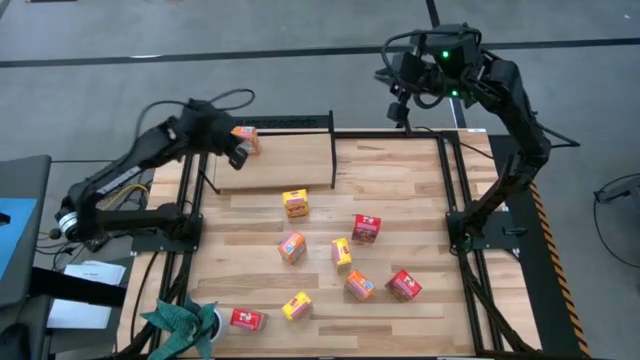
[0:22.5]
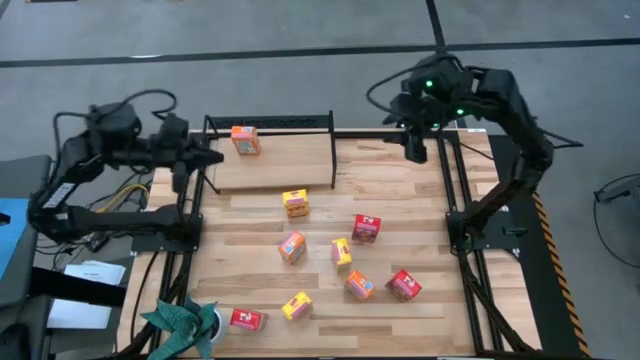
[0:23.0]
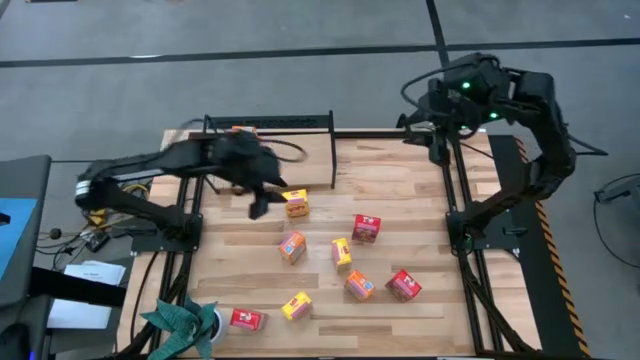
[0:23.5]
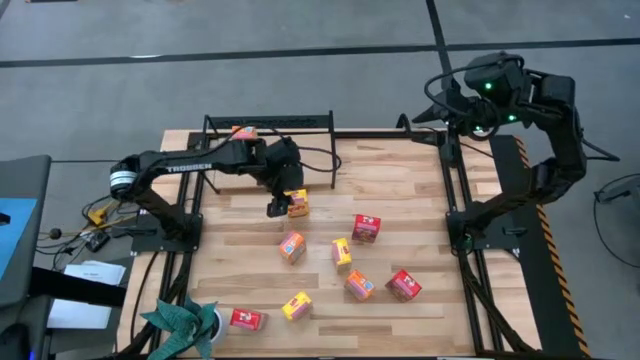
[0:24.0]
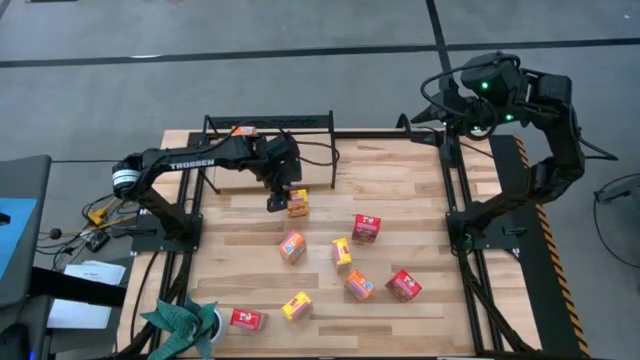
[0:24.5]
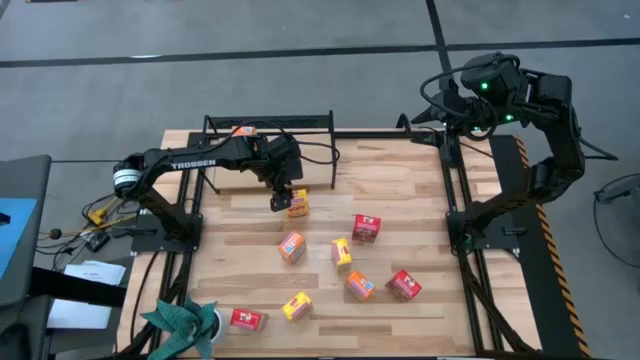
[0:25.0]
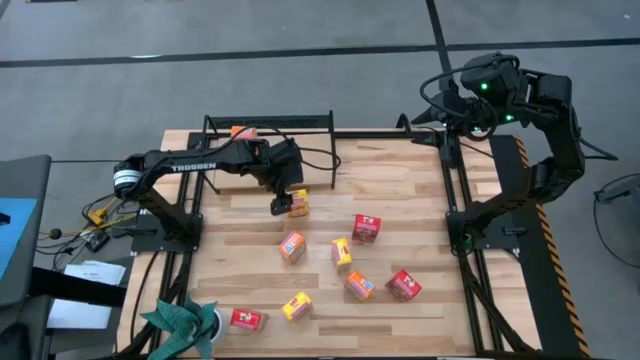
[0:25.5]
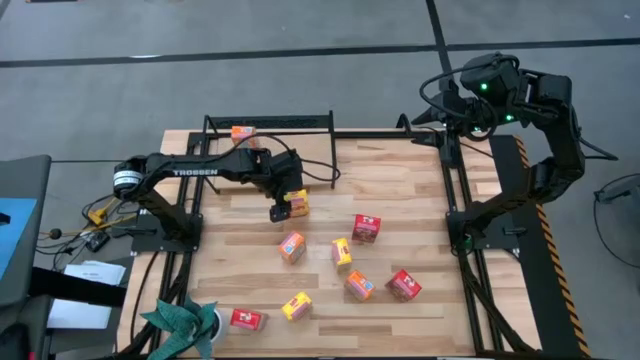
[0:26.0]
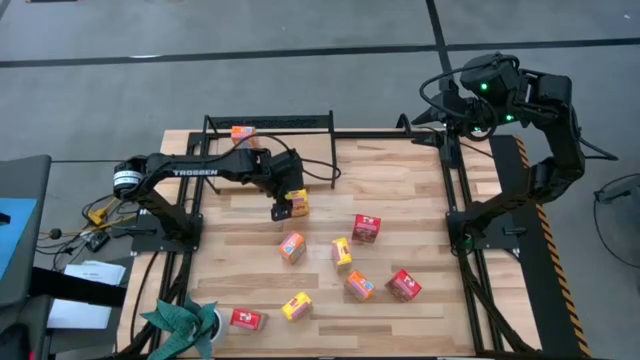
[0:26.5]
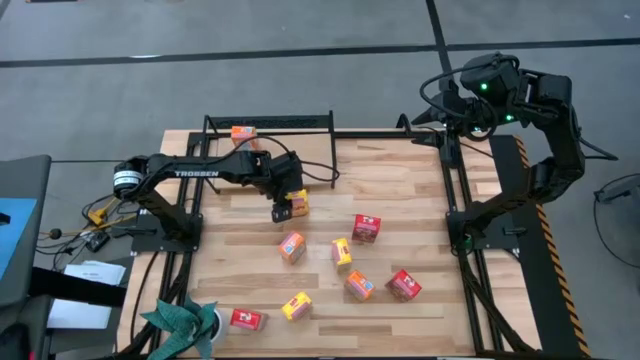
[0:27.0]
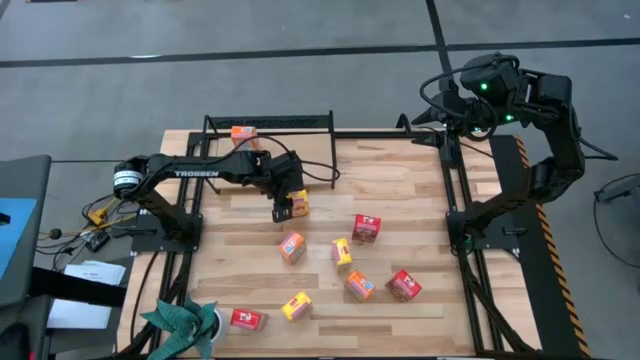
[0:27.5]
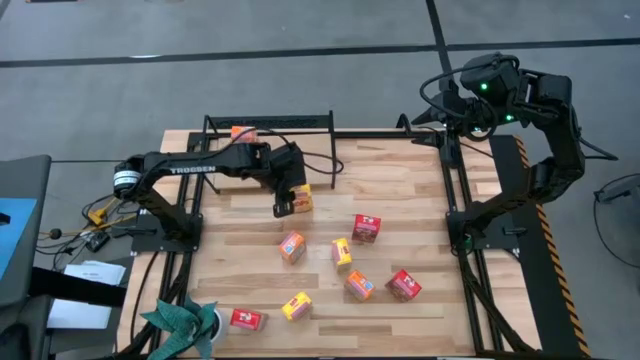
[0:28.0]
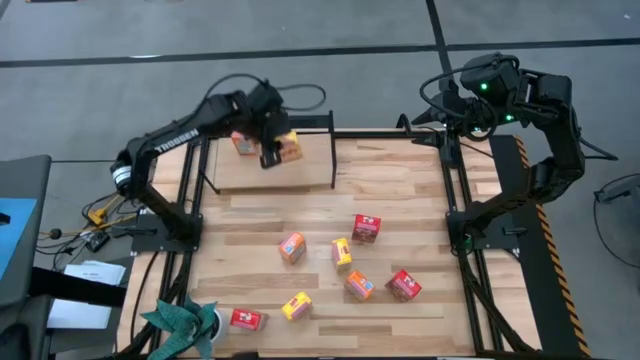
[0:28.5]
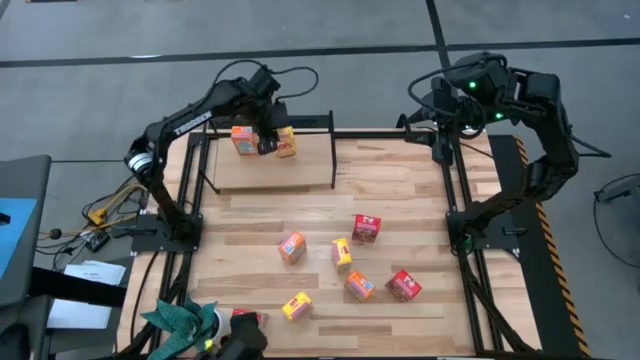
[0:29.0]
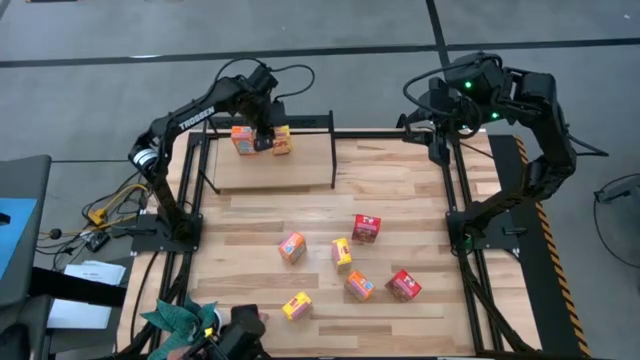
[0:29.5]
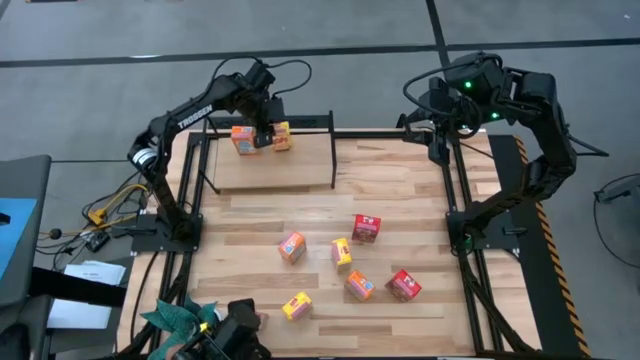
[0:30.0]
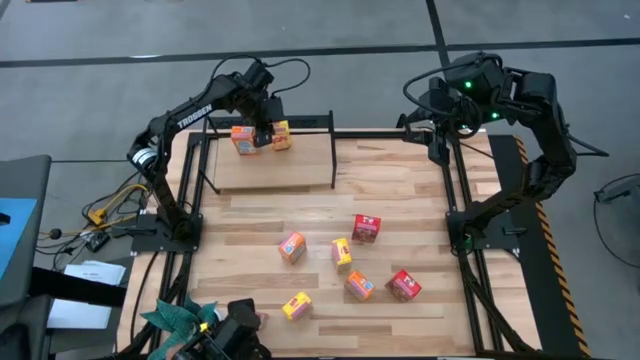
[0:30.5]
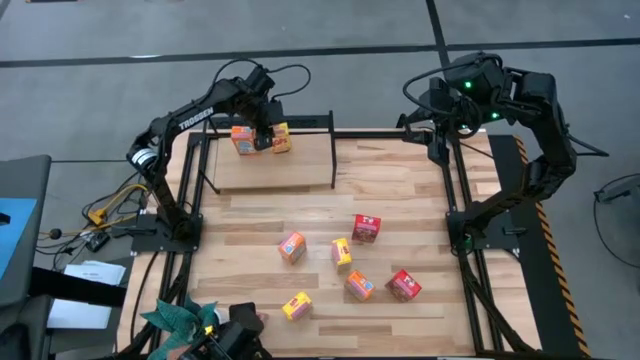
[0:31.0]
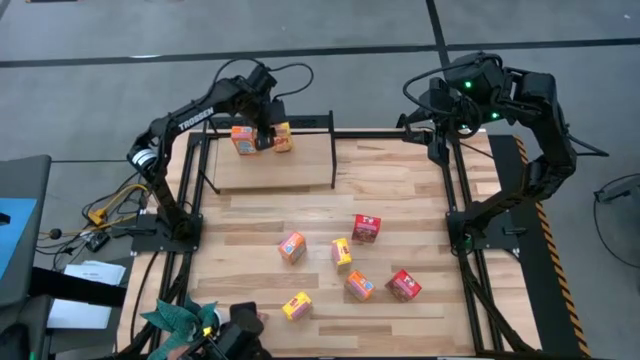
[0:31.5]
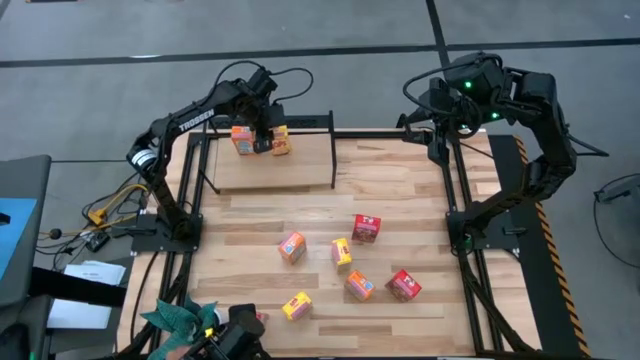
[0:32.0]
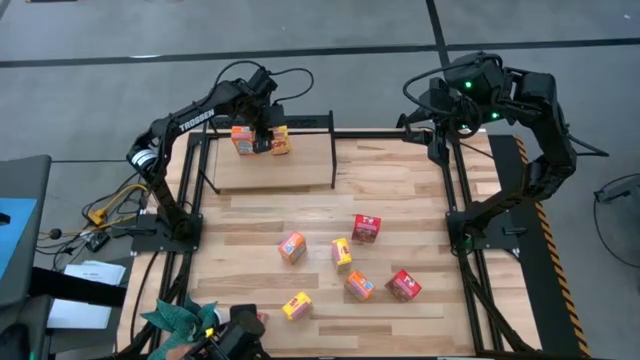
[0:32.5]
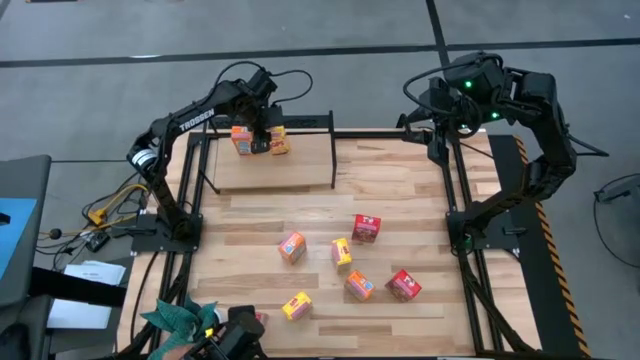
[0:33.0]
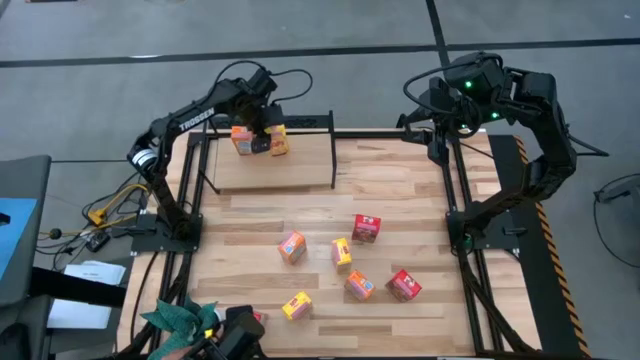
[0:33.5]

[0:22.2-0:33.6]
Task: Stack cereal on shelf
Put the top yellow cereal box on the shelf

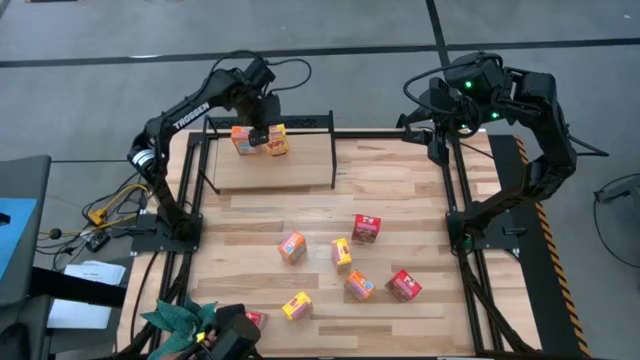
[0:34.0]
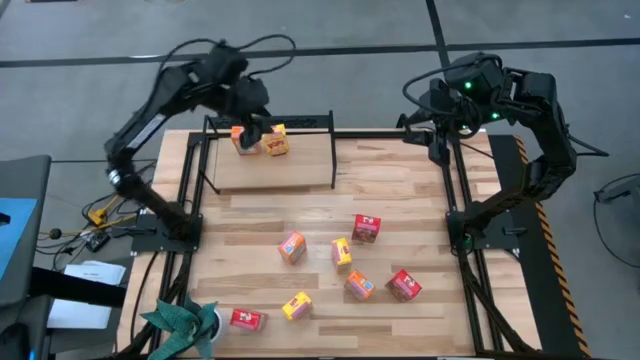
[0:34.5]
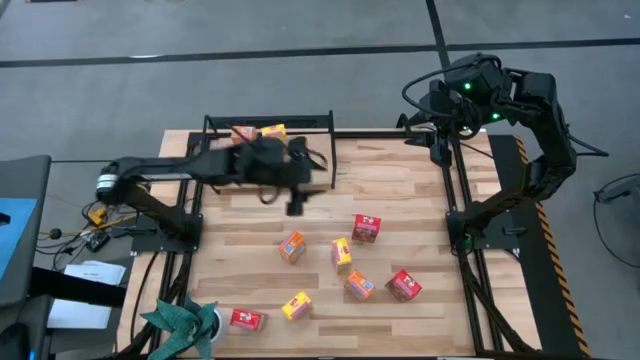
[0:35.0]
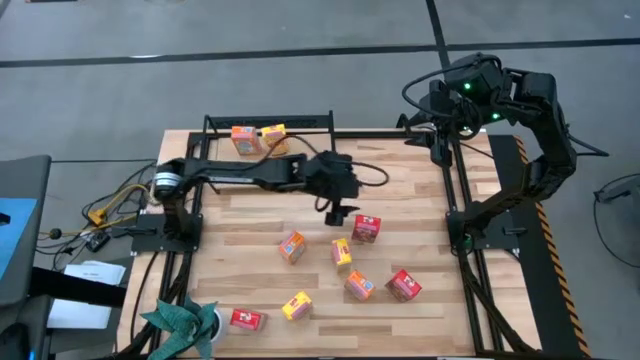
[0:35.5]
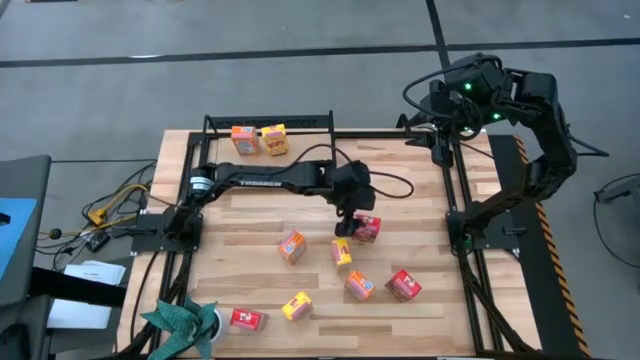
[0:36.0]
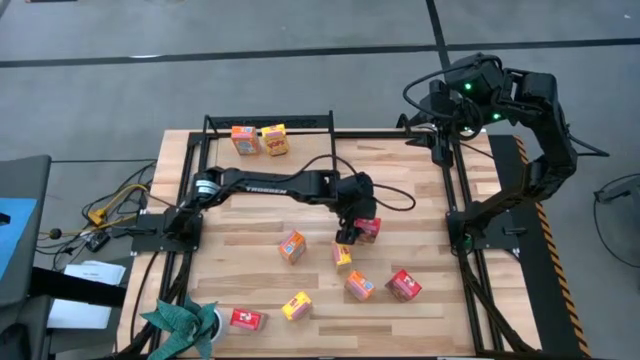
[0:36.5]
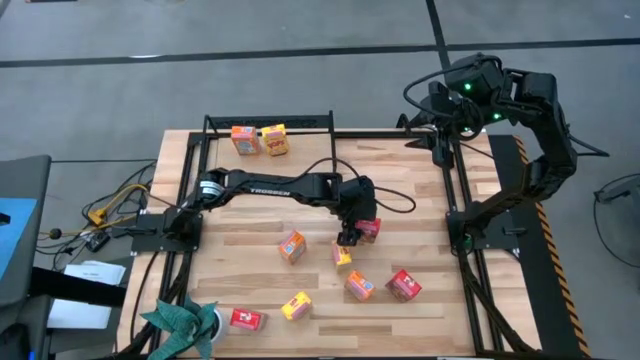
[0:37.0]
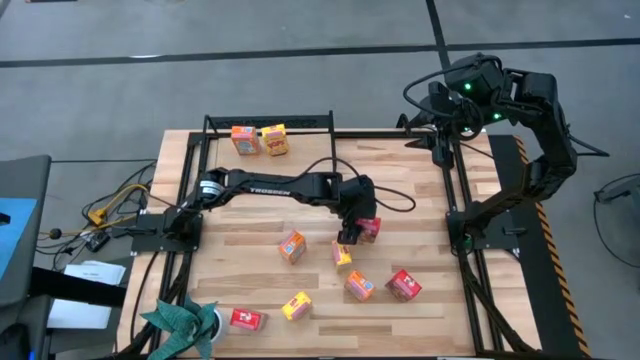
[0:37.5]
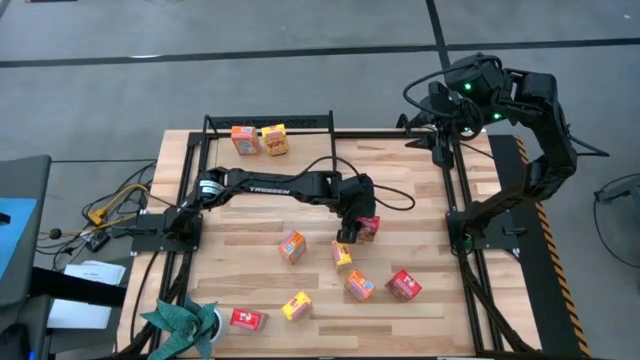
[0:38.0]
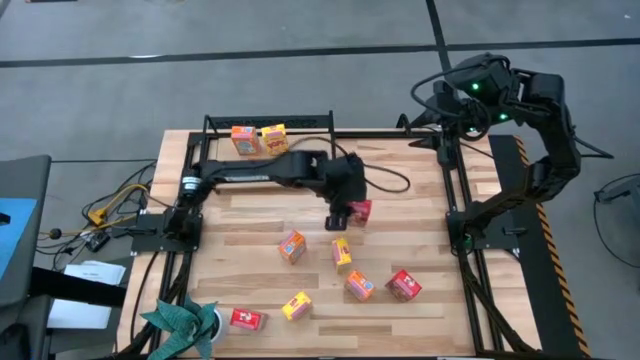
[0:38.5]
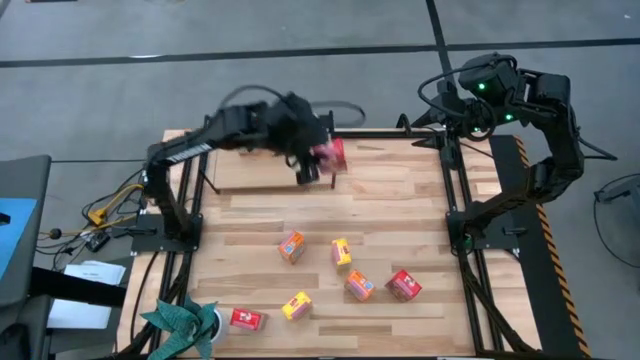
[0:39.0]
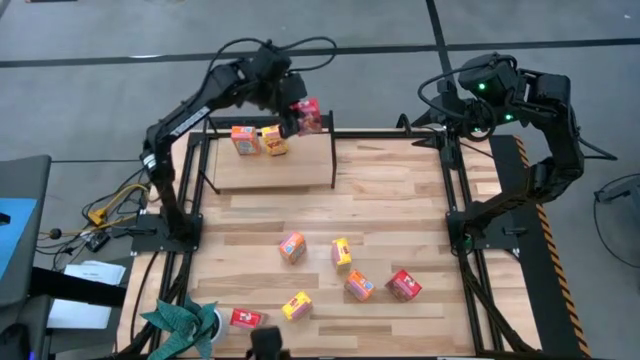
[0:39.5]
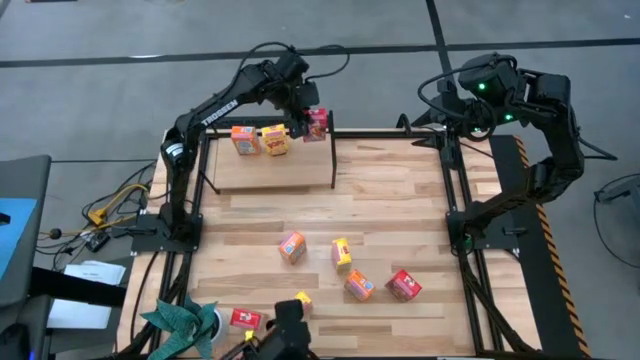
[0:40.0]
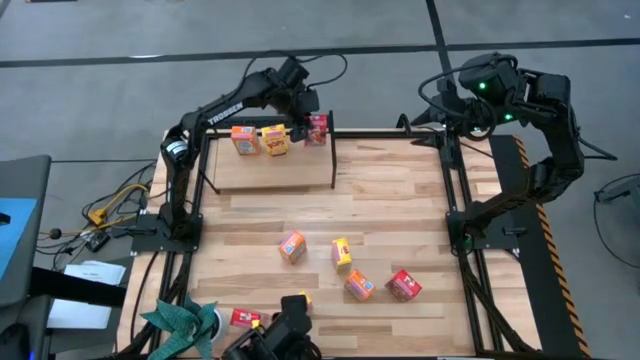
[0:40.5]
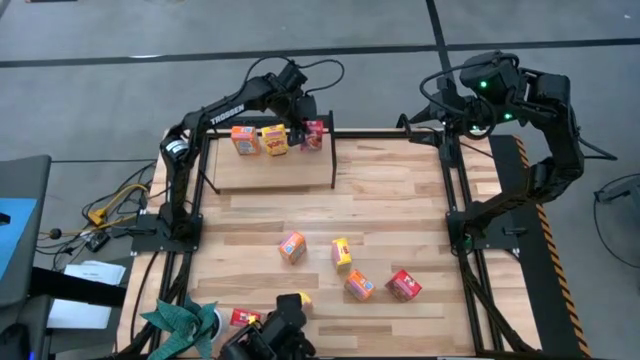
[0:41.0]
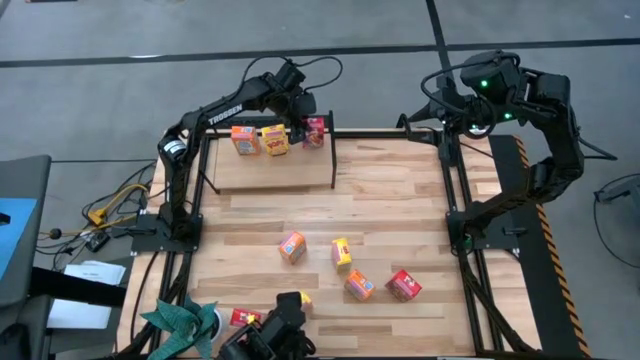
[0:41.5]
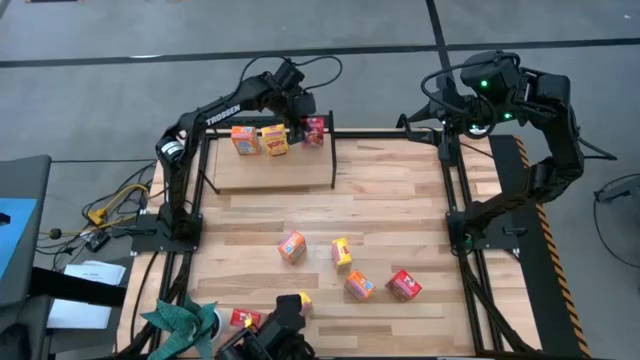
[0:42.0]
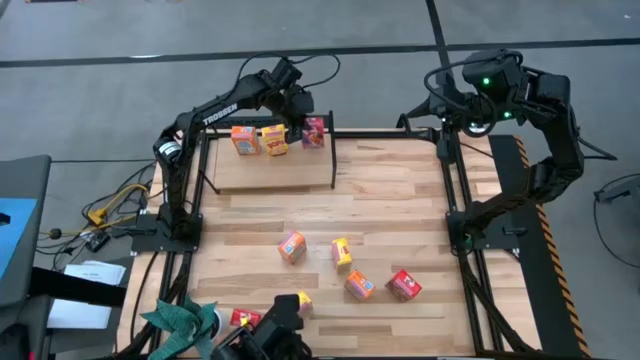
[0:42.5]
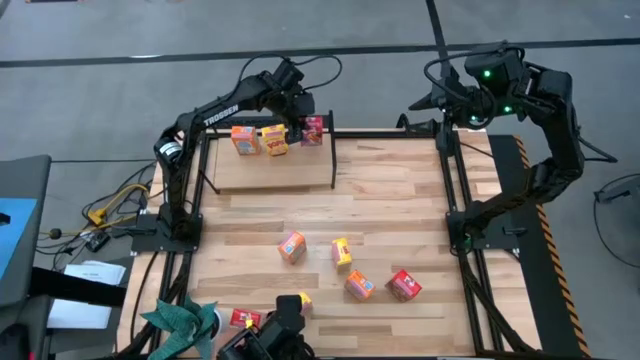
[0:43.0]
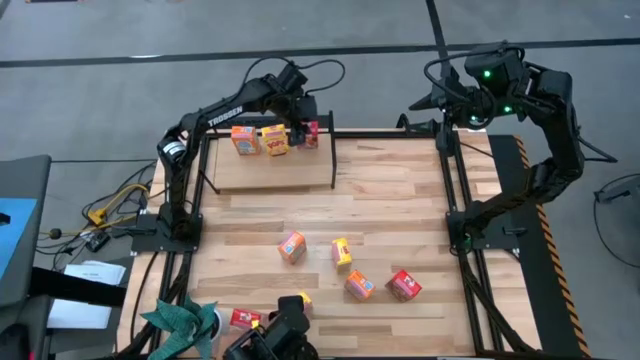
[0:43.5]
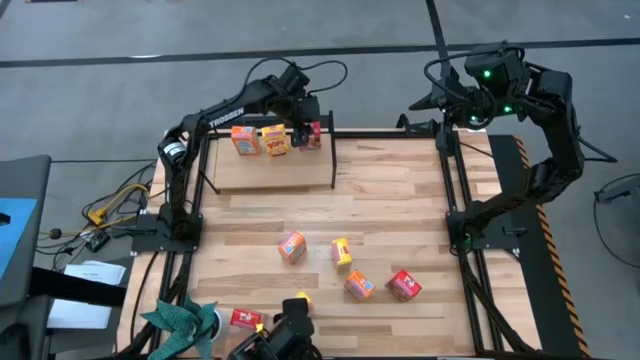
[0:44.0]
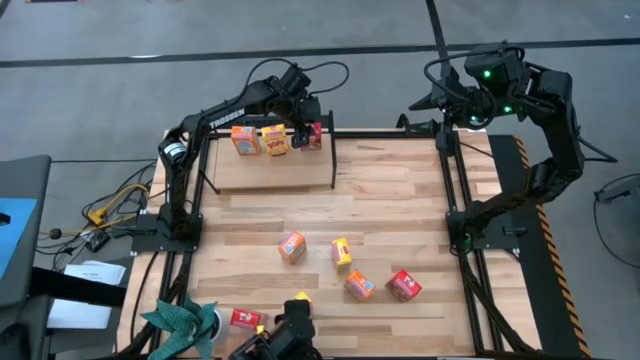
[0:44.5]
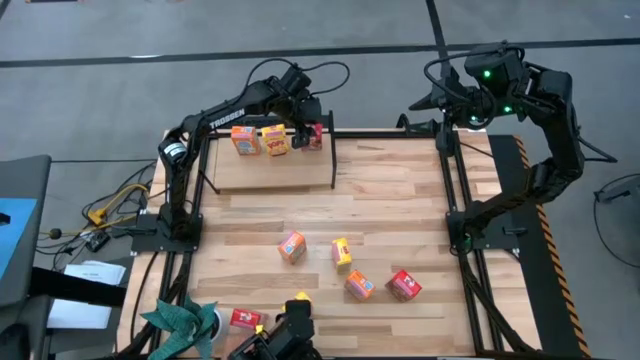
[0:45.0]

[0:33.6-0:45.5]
Put the top red cereal box on the shelf
